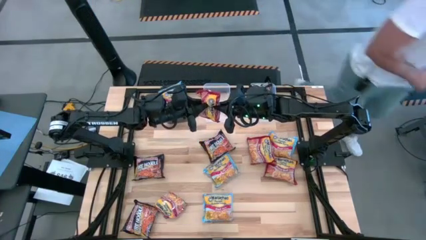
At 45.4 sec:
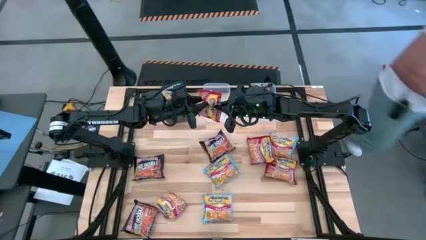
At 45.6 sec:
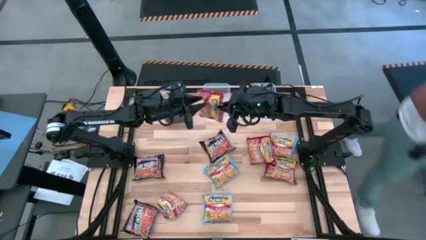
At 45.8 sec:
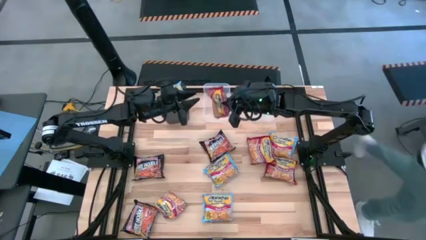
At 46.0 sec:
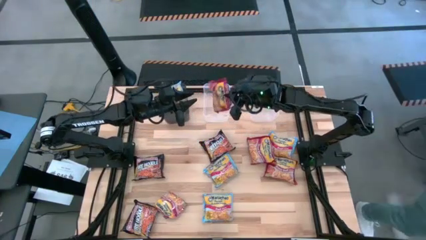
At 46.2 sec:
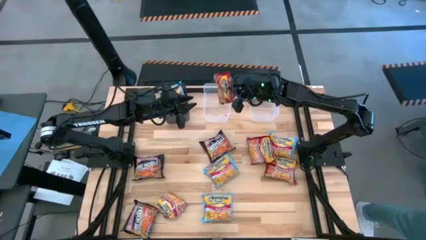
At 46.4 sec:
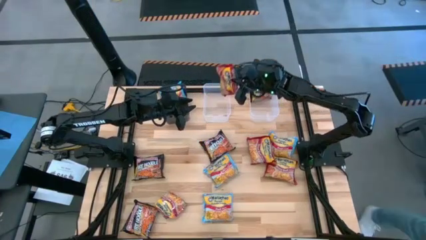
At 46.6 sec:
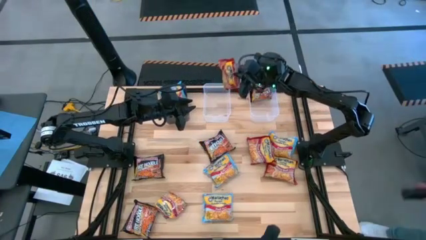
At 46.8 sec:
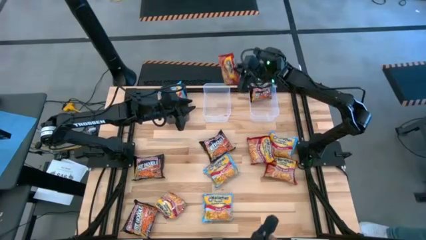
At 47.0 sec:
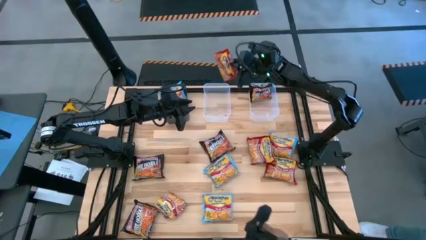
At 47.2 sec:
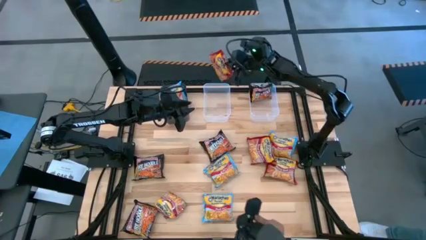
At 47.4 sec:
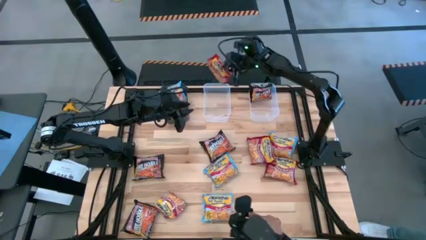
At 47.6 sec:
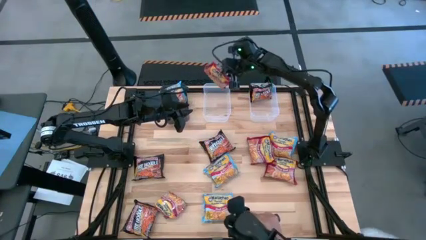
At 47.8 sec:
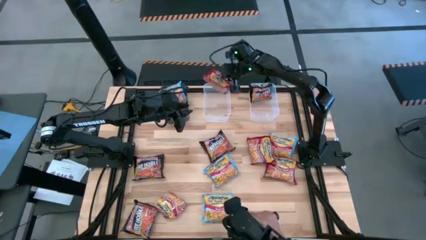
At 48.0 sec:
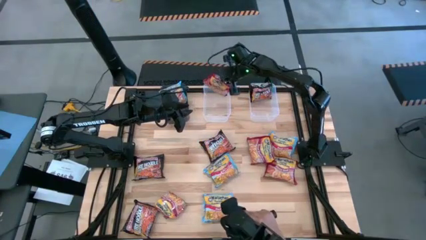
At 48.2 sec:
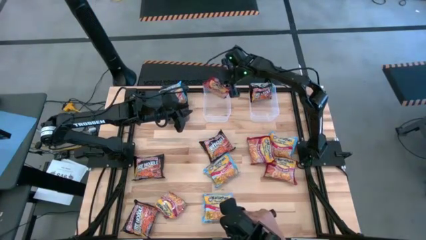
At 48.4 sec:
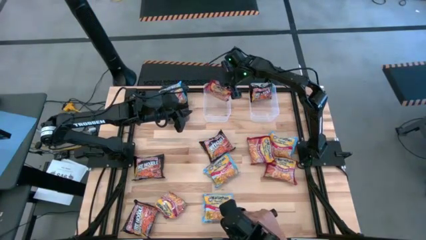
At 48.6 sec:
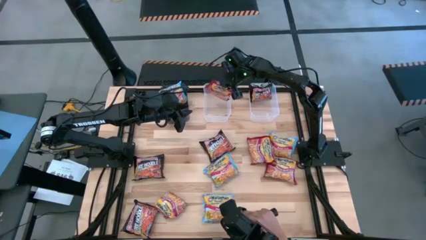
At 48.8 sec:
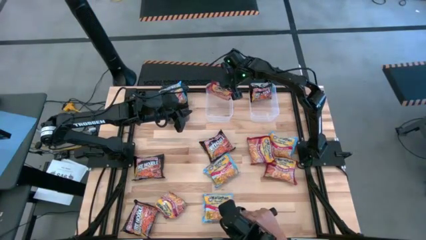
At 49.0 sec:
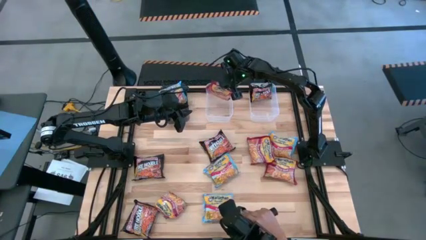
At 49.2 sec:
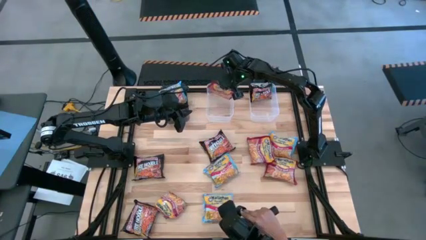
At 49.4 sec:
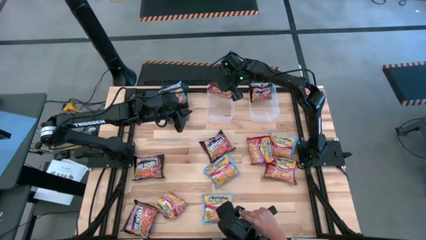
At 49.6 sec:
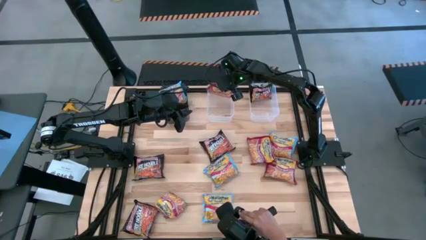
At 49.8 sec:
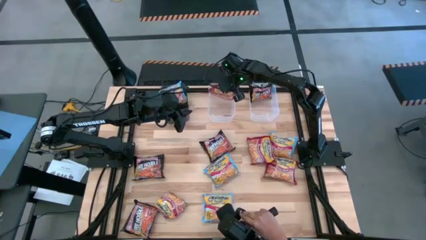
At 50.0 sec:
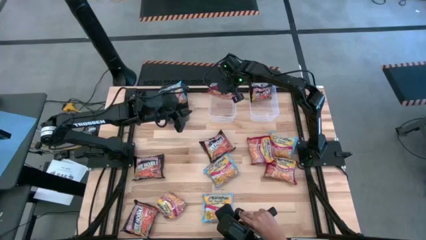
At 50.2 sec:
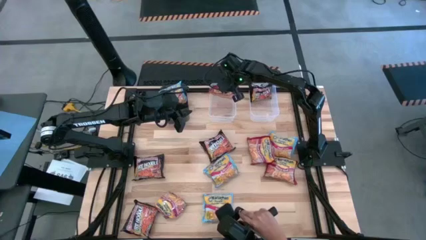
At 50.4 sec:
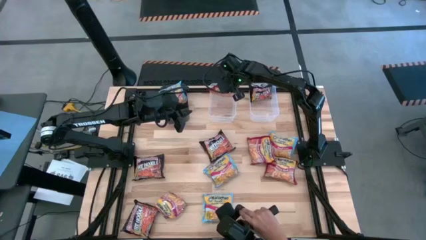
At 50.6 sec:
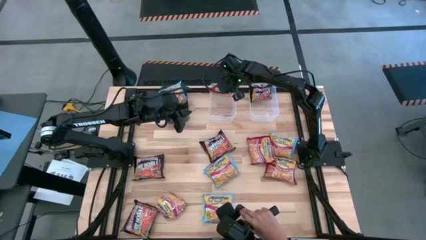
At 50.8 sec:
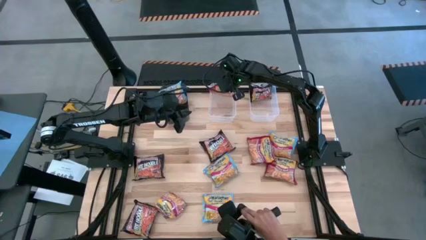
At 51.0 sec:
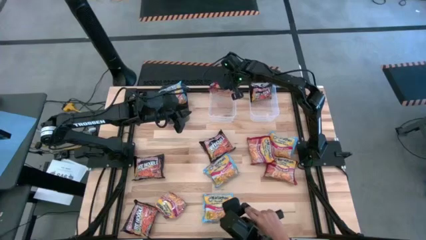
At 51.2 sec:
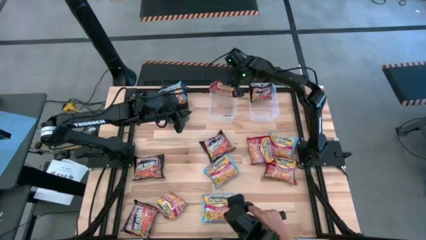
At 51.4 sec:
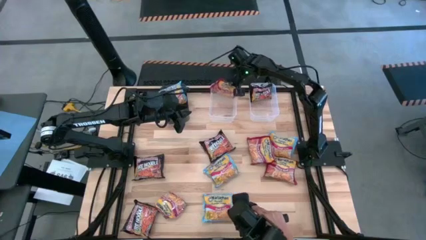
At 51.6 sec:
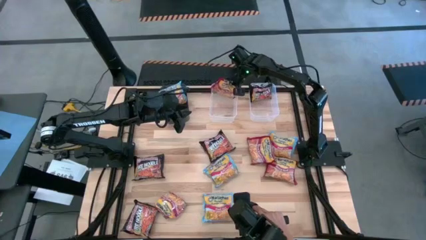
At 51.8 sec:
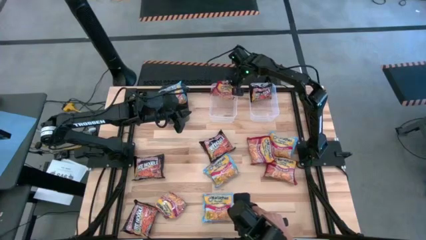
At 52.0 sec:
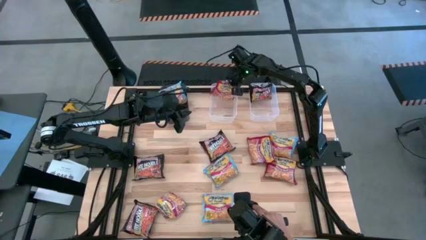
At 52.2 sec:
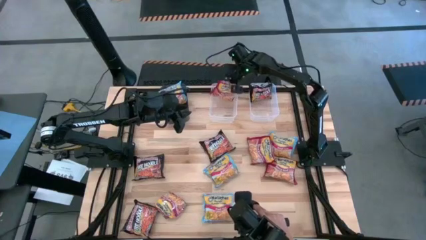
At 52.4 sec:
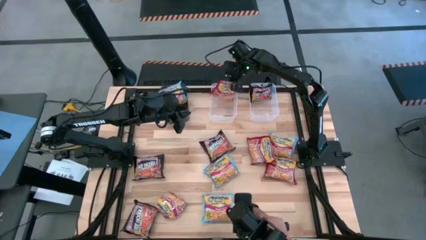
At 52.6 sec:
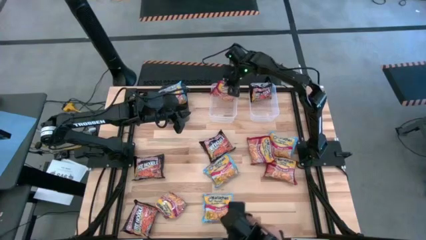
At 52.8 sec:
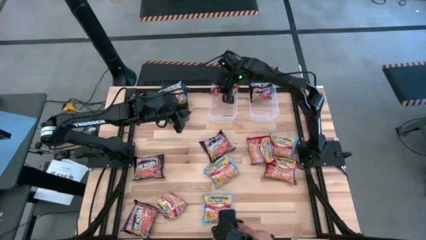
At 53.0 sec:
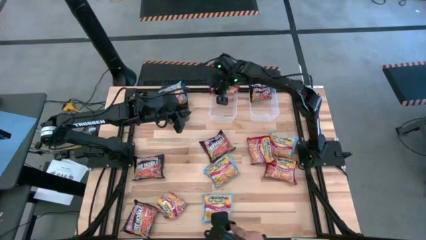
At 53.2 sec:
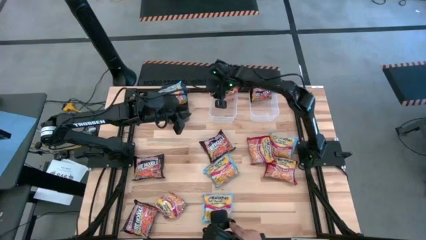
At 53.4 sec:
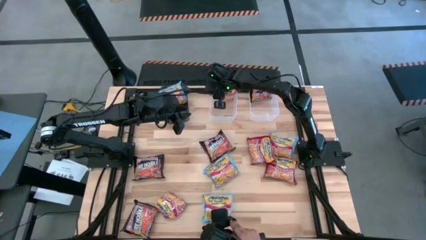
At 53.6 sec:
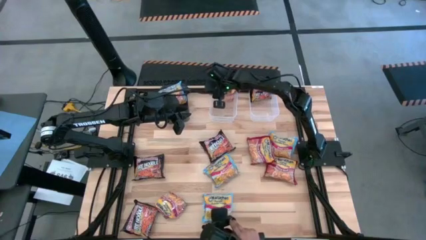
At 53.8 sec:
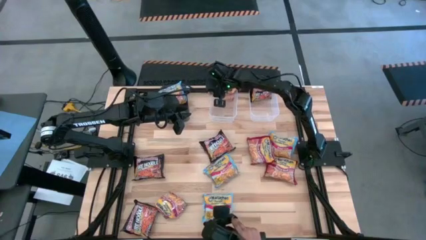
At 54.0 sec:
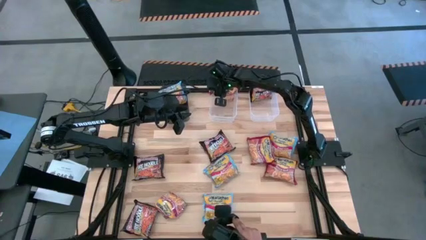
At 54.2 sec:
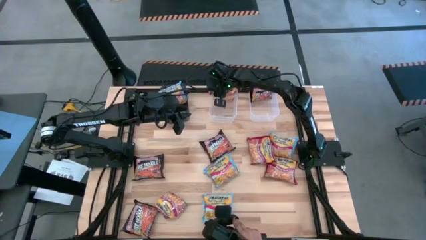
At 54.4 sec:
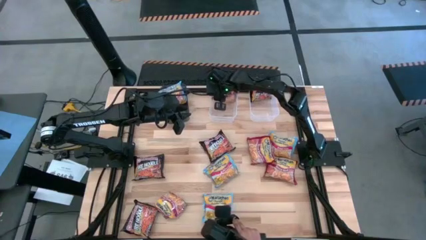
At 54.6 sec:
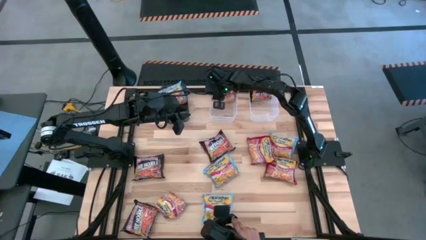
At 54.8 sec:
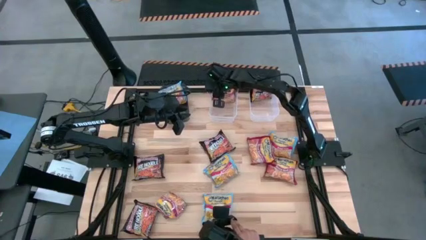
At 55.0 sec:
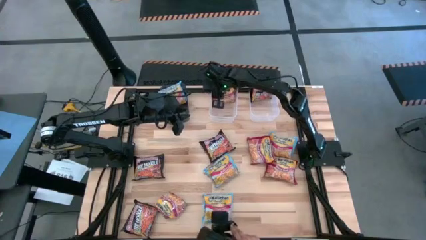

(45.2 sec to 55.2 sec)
Task: Sort Maruchan noodles
Put the red noodle pack into the left transparent bin

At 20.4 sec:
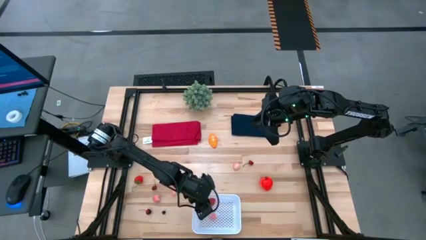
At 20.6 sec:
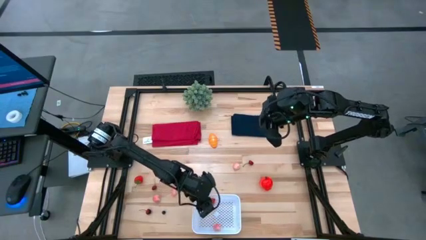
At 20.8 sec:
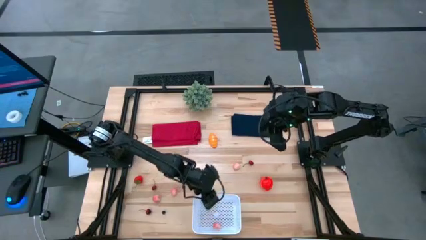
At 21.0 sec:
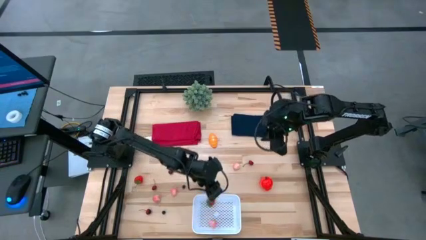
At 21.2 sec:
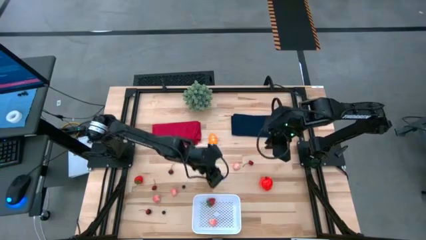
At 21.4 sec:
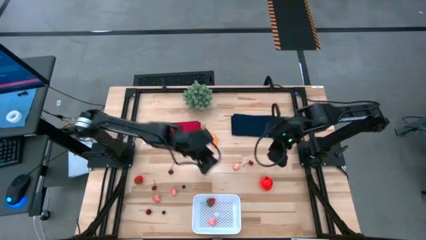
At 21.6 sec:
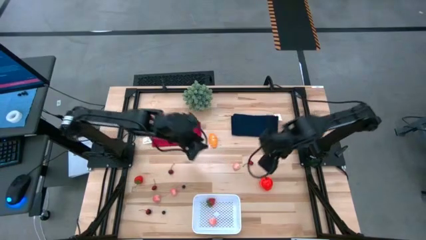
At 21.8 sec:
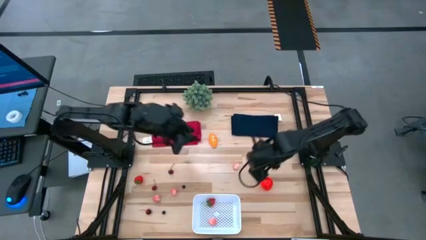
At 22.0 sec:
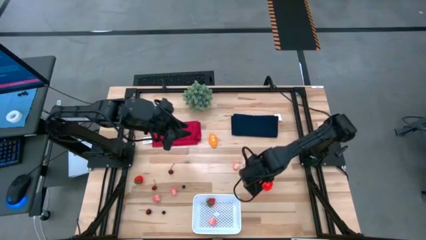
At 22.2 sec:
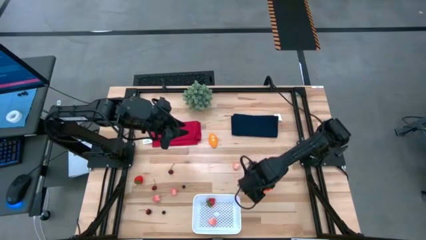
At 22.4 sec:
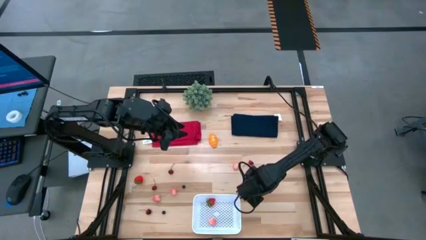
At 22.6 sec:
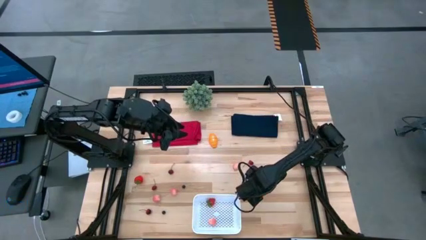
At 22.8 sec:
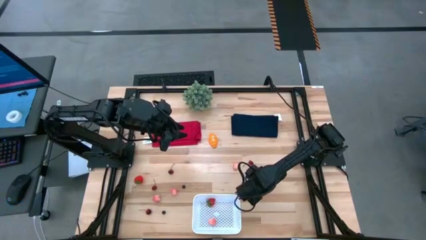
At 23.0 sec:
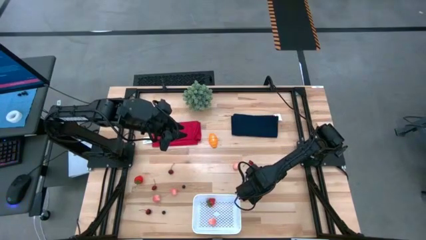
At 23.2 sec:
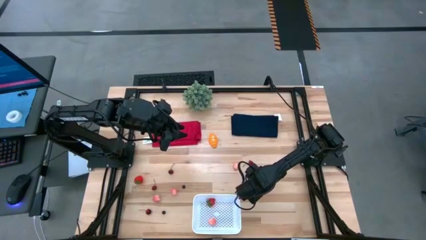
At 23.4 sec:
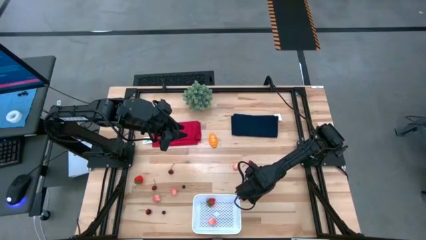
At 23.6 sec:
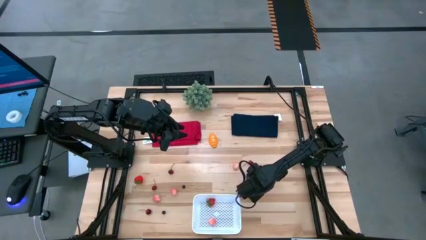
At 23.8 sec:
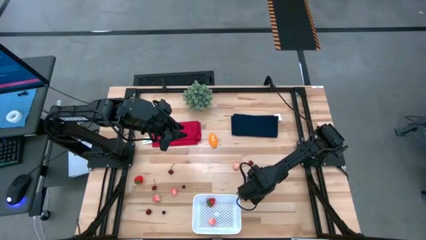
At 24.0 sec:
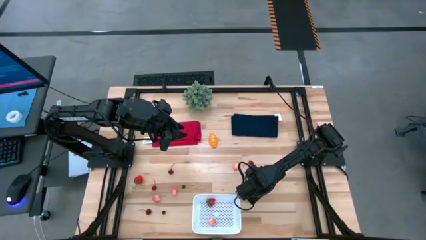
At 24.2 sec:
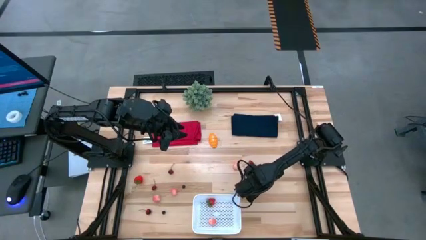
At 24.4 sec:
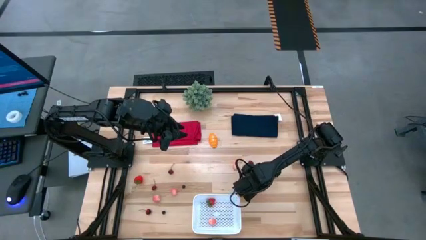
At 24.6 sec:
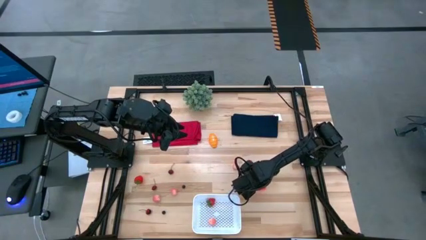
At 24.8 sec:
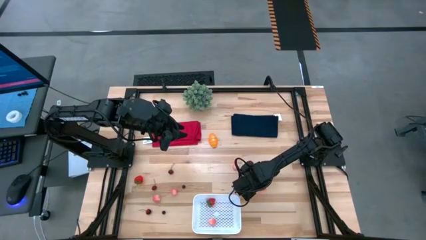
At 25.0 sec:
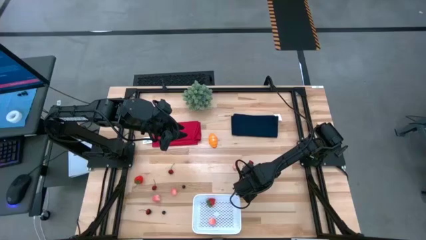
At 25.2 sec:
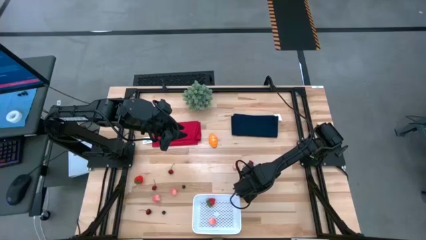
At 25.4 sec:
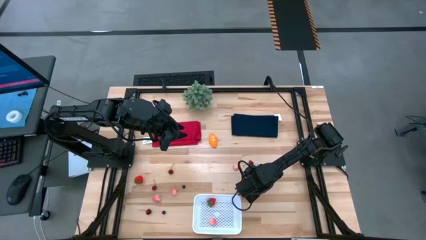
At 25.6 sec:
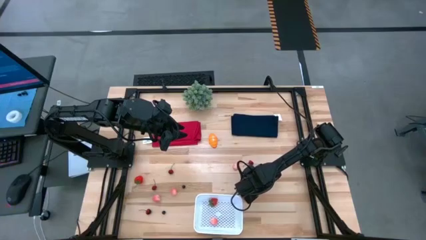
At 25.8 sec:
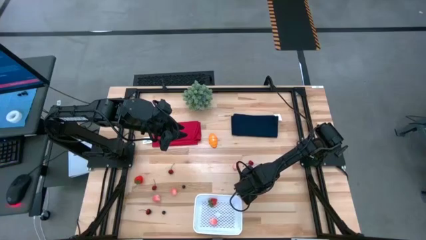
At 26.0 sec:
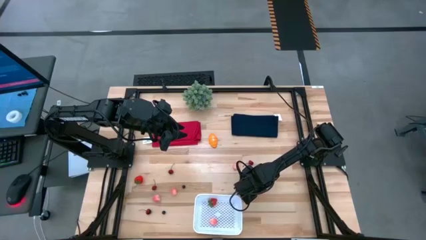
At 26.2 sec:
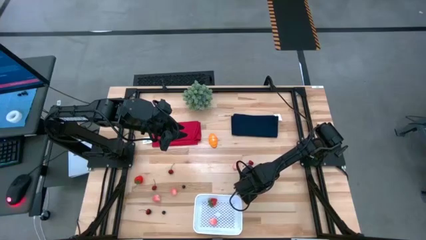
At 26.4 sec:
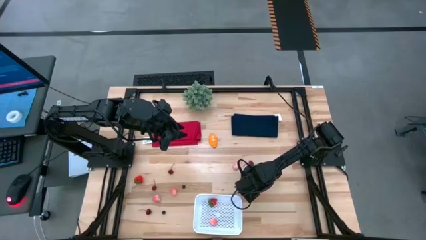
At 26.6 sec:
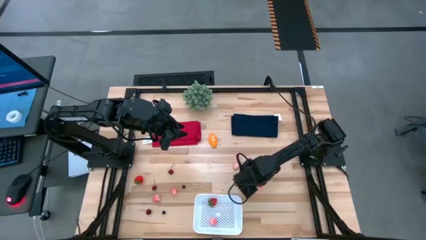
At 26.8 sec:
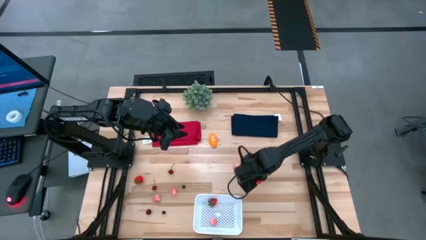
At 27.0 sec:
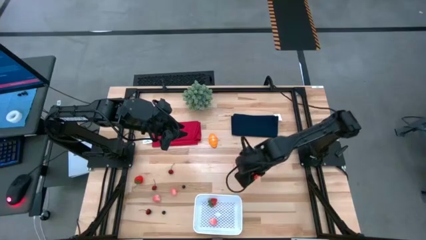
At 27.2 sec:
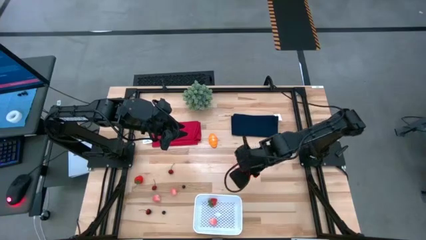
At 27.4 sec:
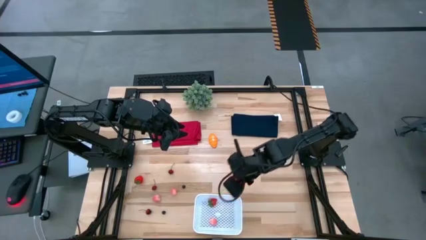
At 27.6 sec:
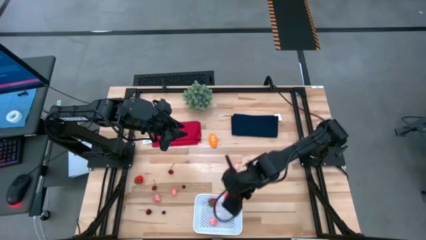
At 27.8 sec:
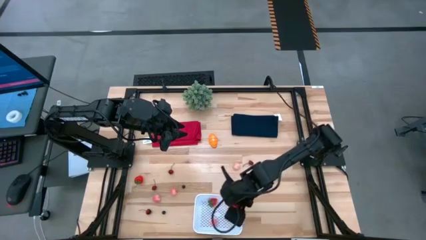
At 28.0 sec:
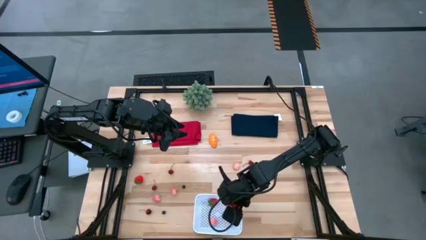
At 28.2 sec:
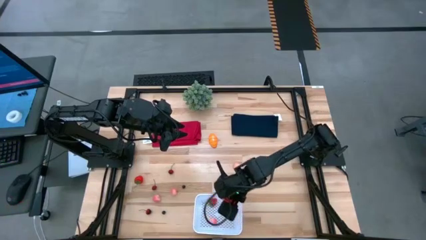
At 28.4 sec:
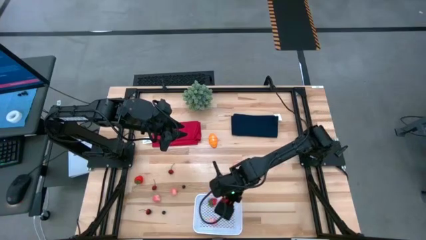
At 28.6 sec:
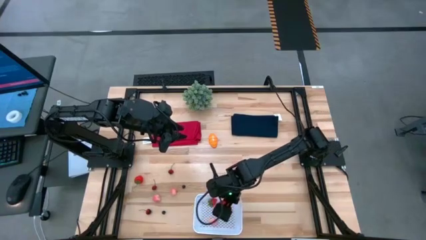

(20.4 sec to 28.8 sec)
Task: Pick and placing Produce into tupperware
Put the apple into the white bin
